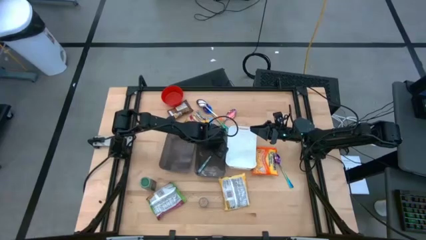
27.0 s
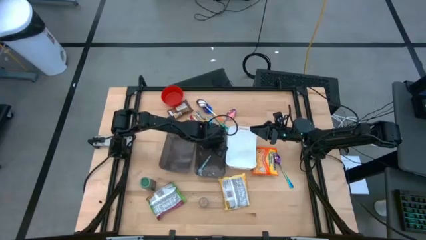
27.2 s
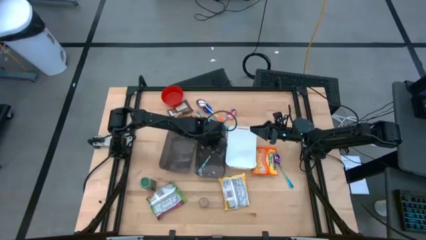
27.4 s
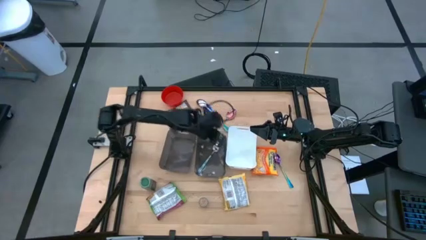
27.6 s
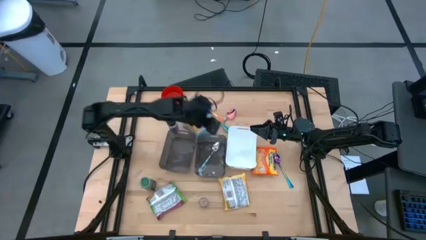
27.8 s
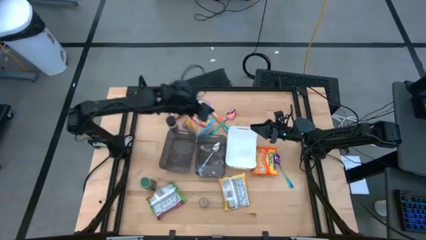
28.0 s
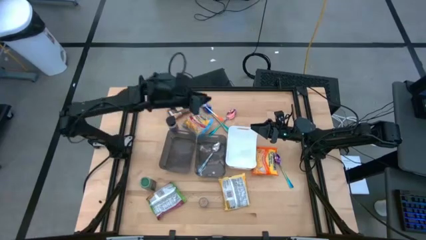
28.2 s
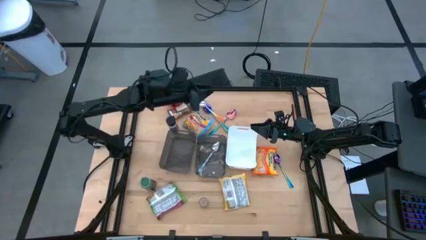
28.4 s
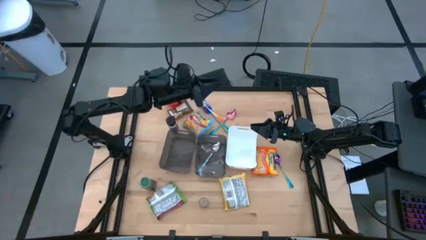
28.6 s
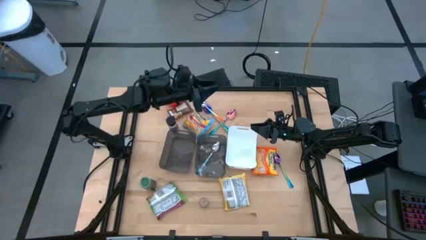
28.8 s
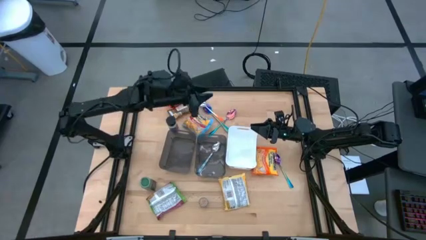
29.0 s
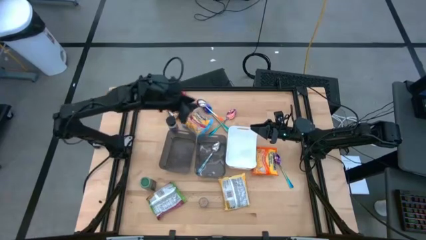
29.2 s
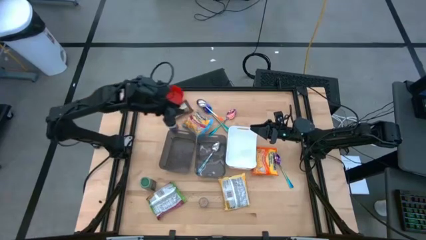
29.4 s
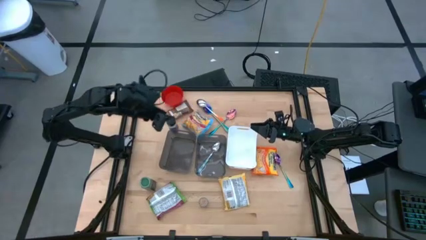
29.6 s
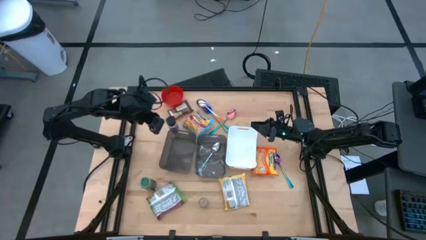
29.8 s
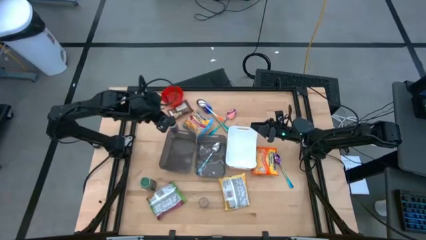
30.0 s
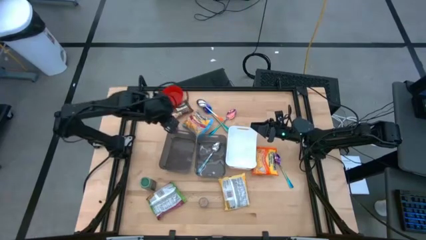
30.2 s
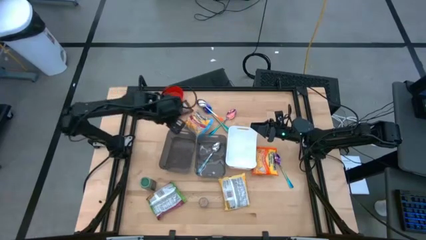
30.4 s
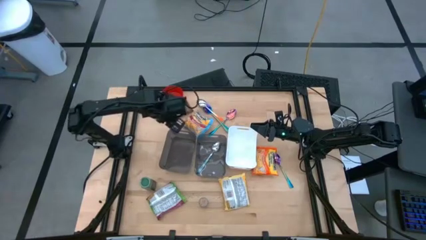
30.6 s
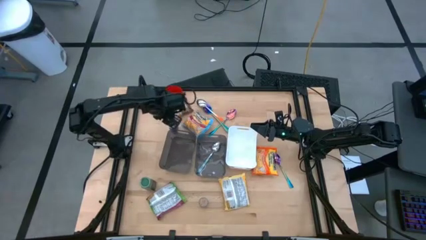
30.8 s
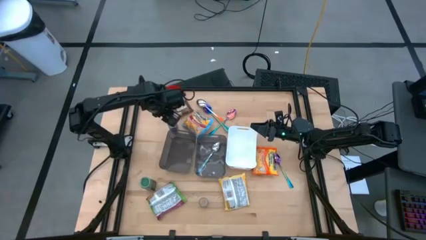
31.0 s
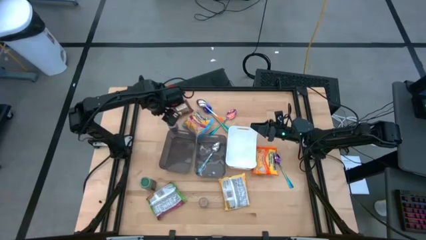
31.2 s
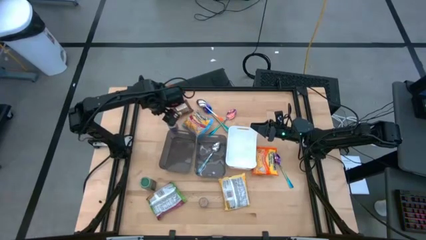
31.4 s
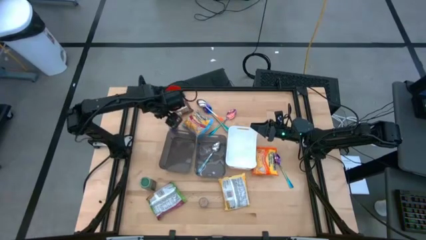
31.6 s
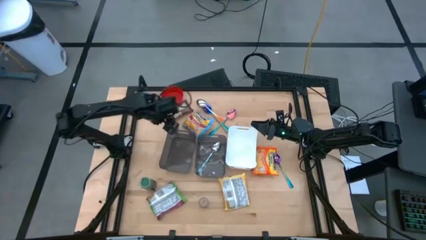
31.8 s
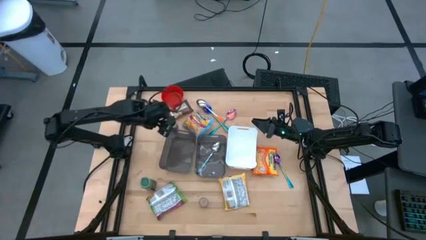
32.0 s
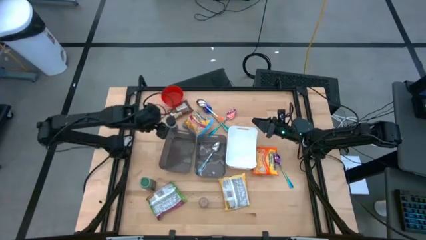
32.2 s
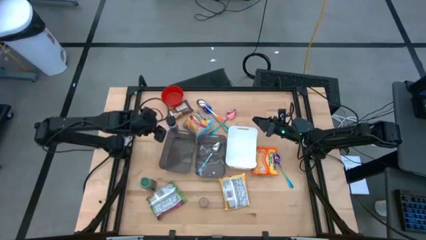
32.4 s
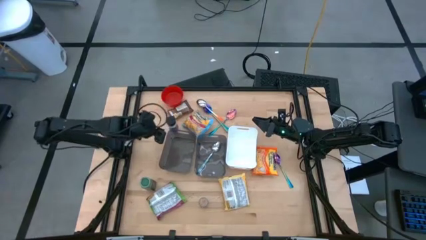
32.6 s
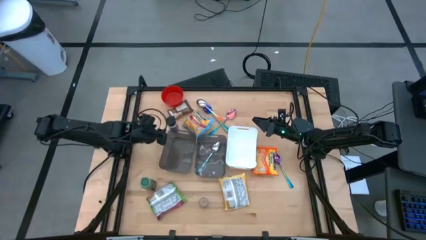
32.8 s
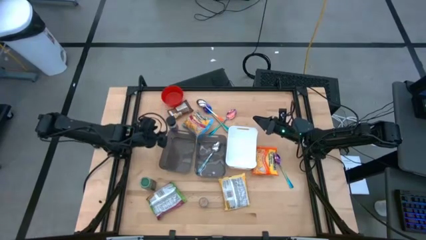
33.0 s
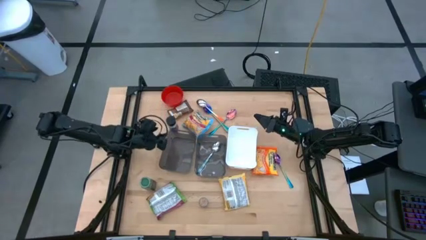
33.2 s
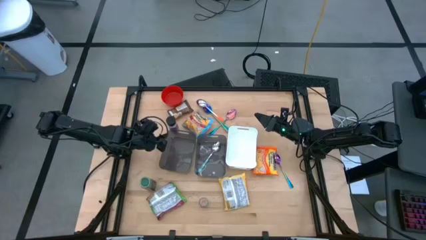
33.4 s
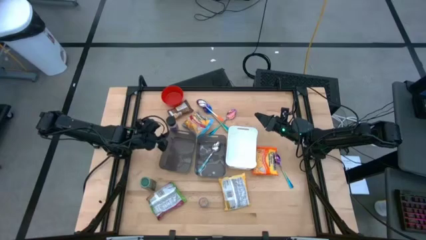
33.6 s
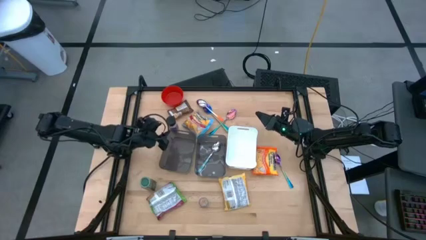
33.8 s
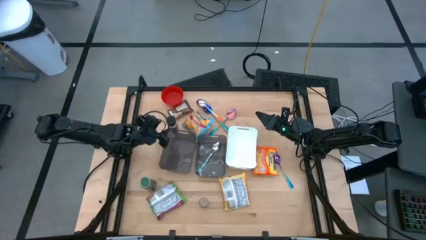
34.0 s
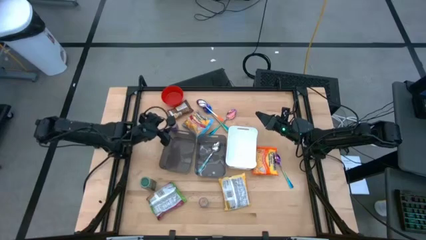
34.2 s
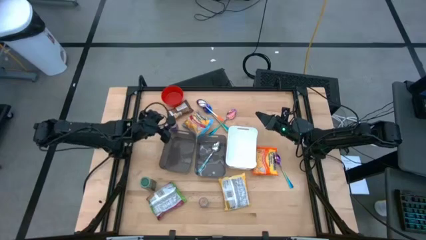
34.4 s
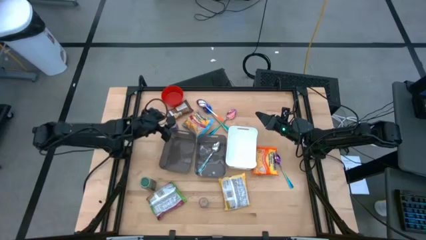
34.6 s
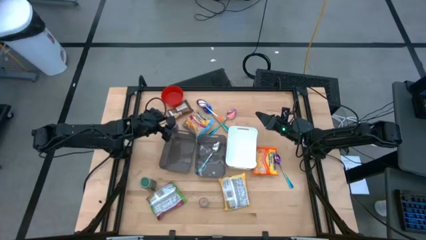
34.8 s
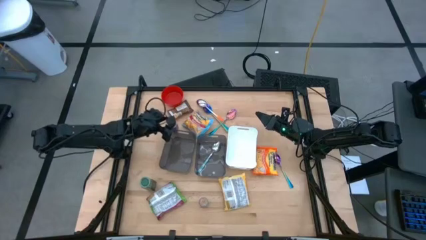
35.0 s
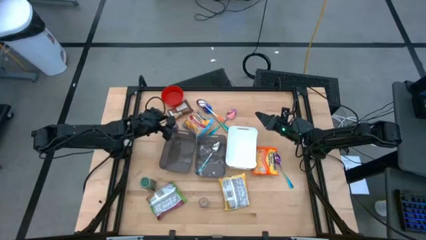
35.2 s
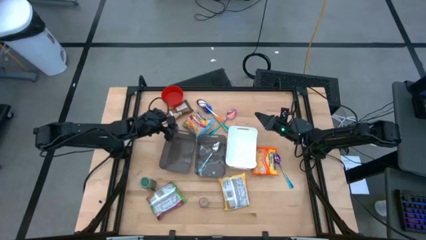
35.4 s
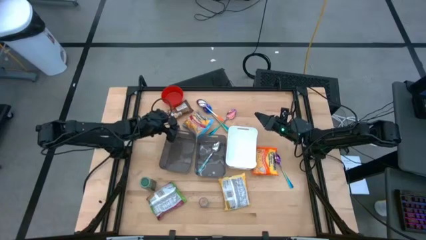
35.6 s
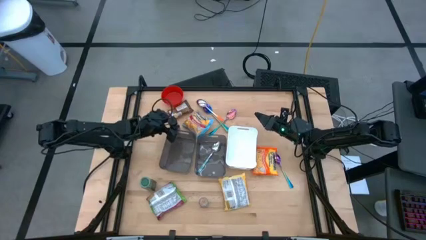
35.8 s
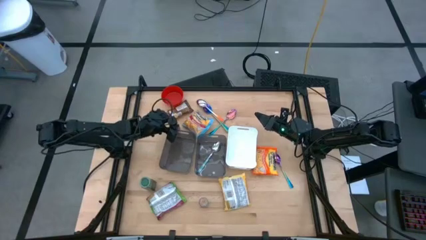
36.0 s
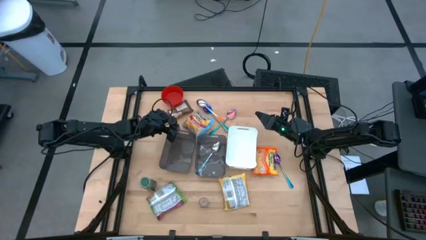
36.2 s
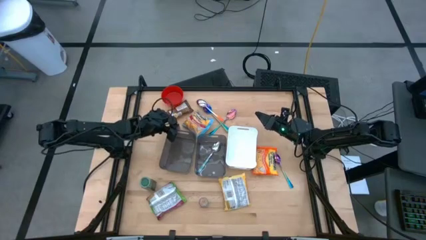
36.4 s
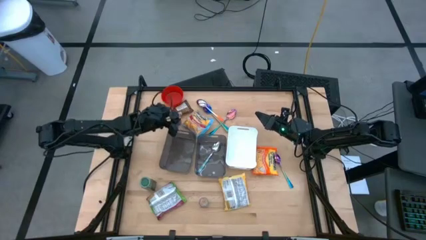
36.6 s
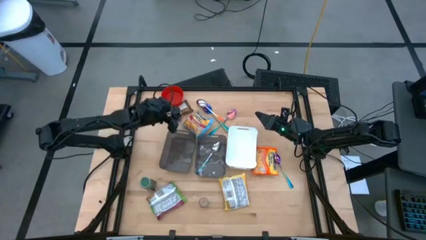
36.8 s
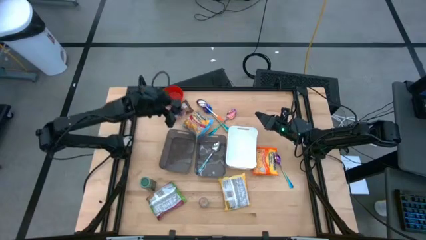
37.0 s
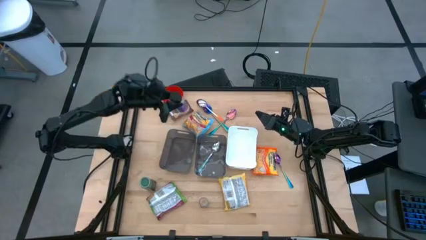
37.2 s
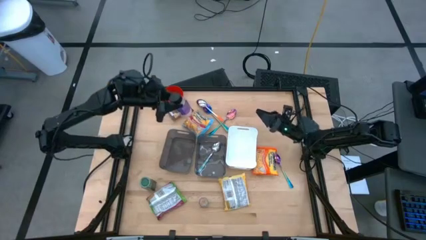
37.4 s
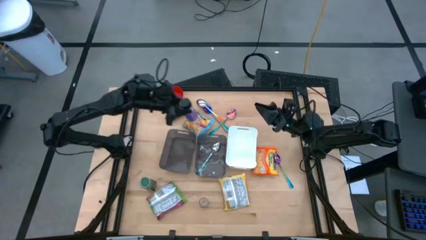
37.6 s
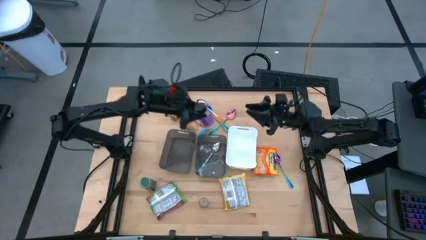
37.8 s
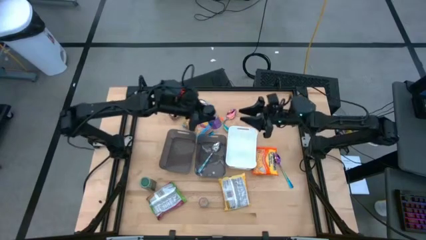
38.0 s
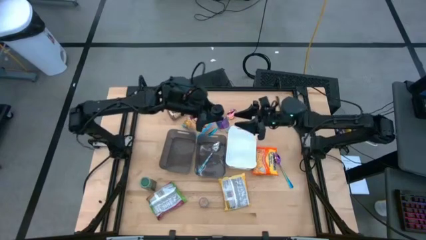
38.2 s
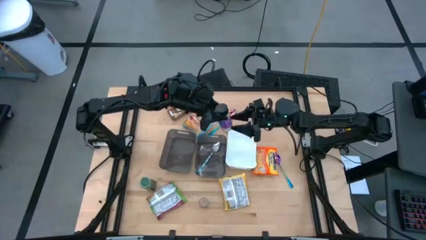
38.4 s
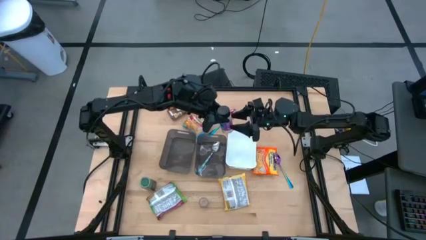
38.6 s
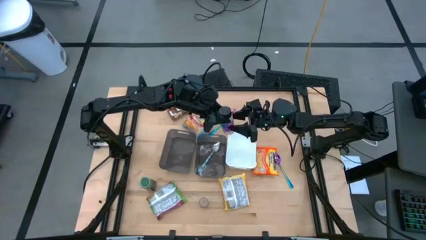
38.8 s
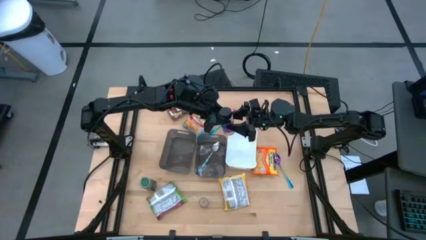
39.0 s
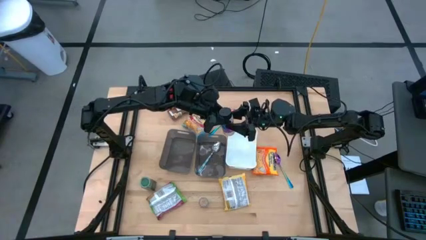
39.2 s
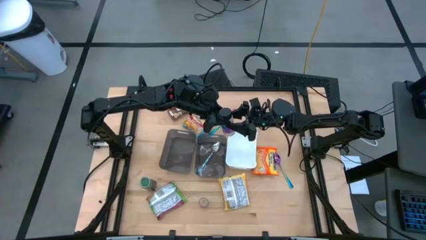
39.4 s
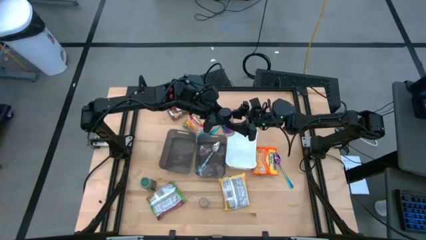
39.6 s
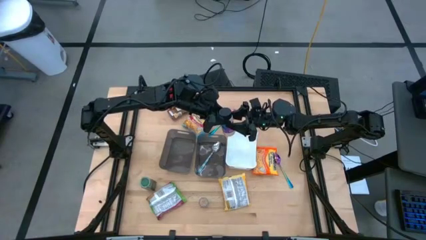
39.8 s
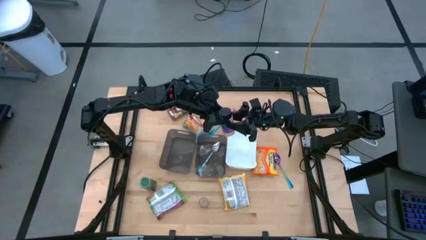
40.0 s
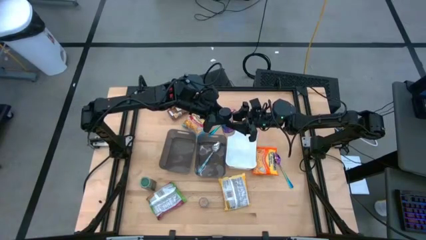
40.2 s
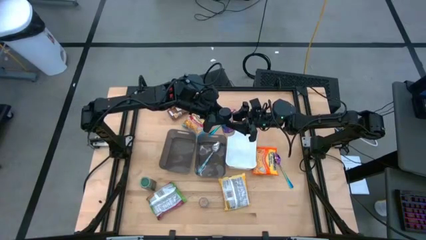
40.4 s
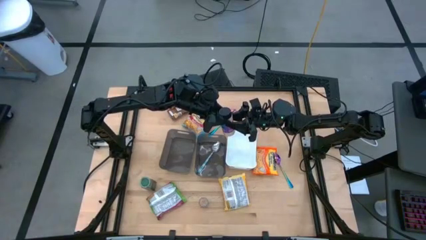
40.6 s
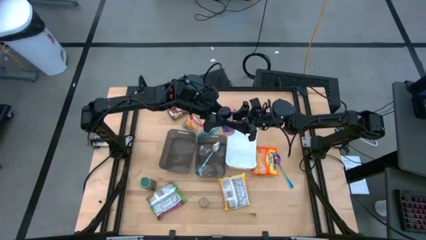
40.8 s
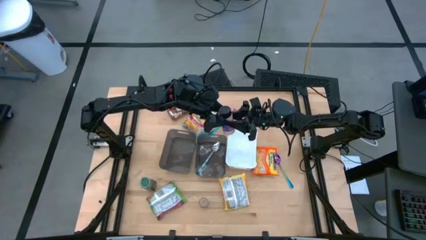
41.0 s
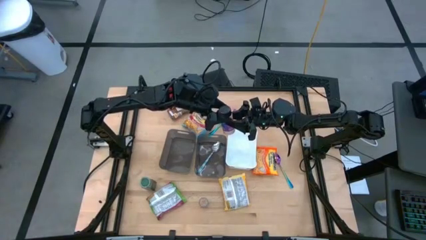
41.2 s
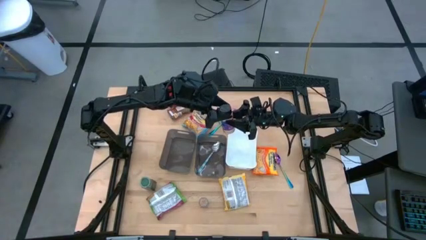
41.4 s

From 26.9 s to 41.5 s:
Task: Pick & Place Food Item
Put the purple bottle into the white bin

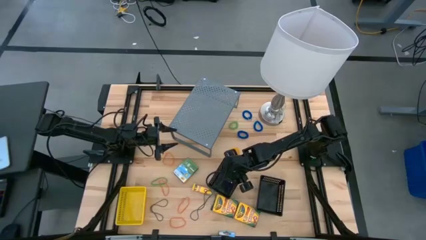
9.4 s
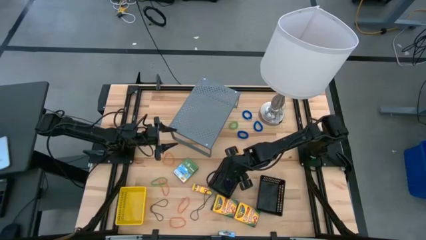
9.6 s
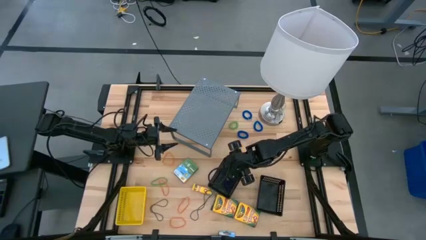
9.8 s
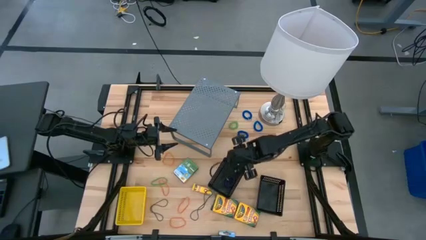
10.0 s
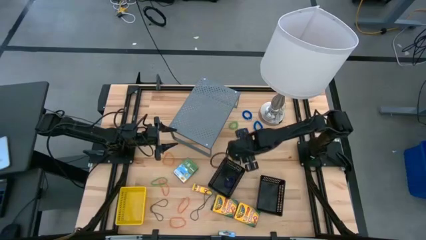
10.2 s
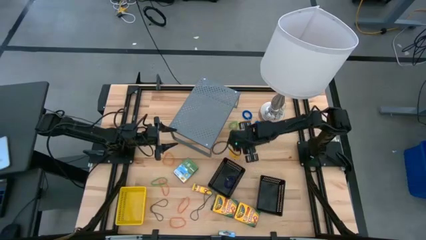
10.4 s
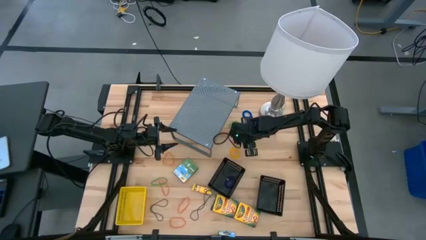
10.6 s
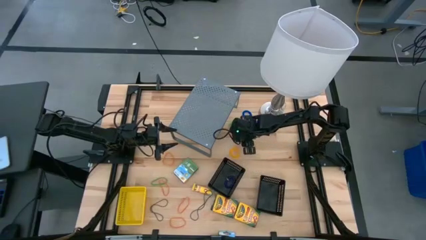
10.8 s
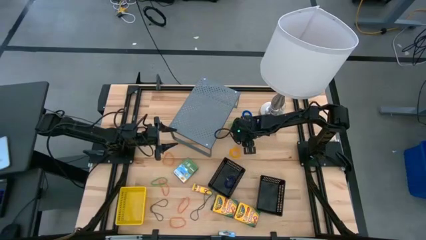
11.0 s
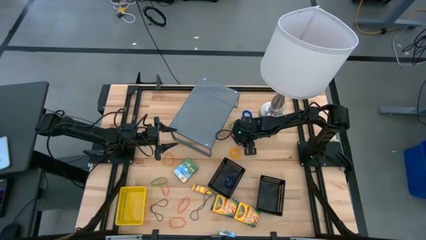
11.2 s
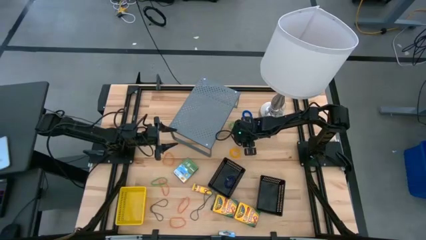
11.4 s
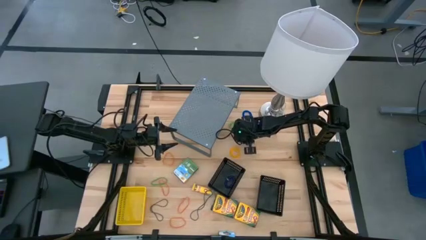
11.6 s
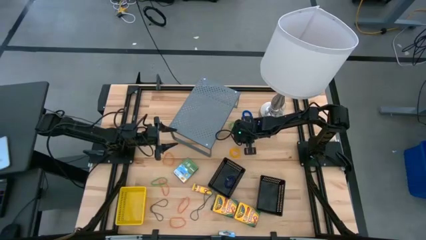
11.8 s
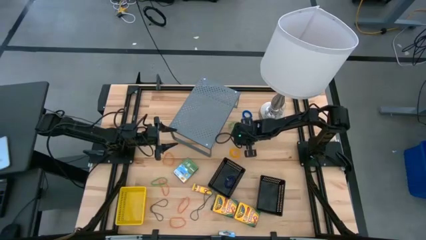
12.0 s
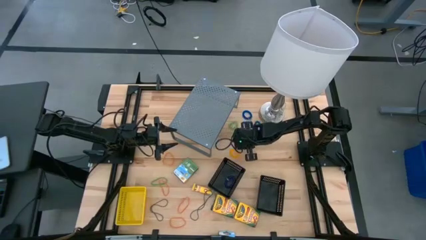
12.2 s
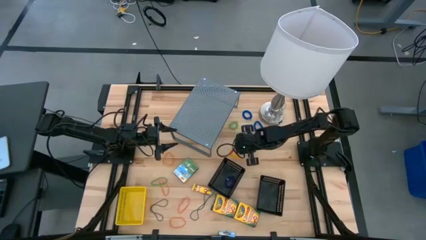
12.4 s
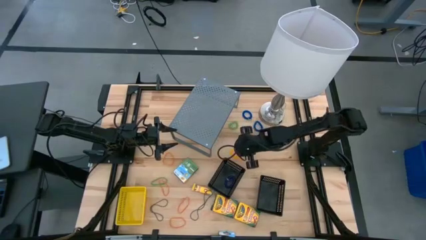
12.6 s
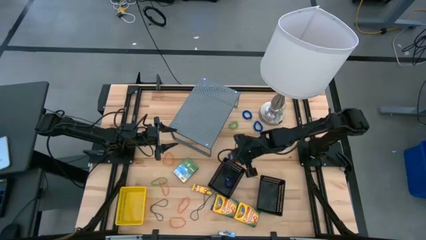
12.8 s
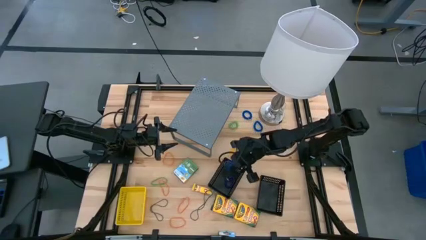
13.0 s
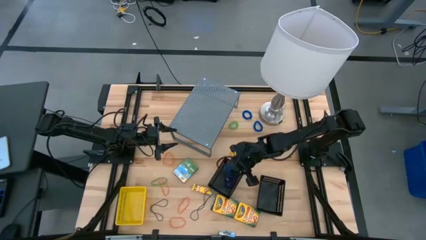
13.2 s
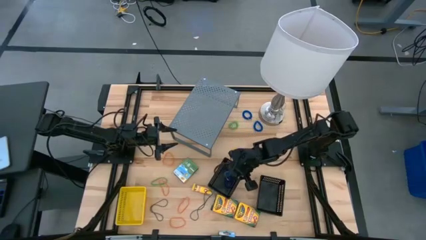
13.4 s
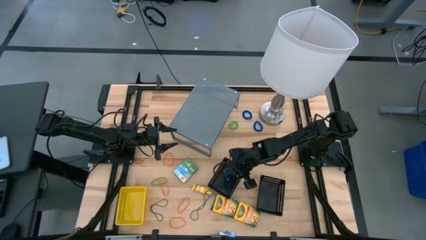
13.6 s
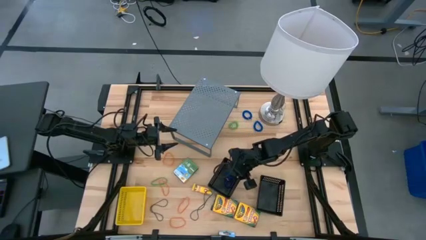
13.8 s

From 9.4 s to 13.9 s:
Task: Pick & Place Office Desk Supplies
Put the bottom blue spring keychain into the left black bin
